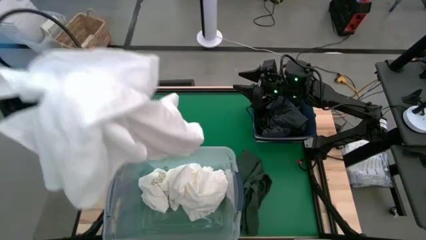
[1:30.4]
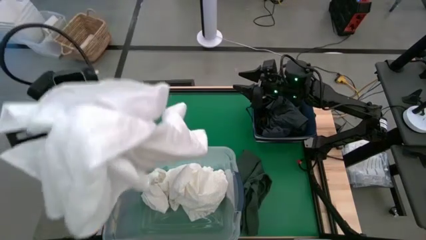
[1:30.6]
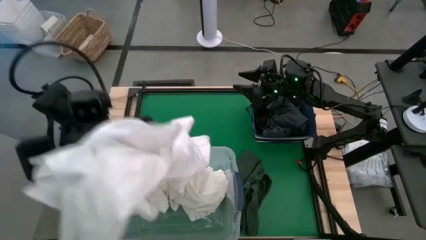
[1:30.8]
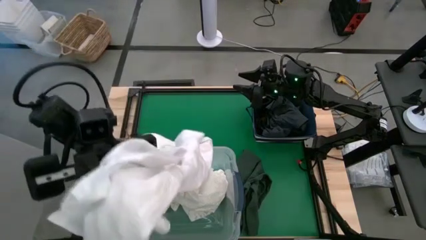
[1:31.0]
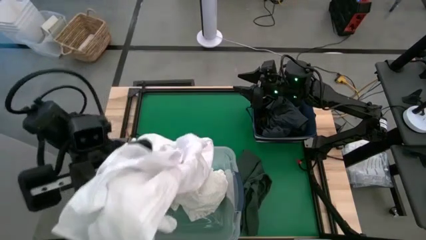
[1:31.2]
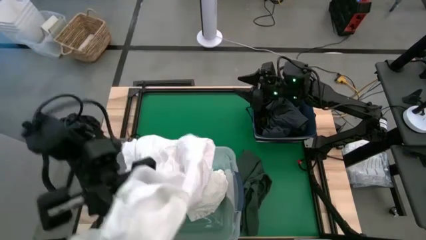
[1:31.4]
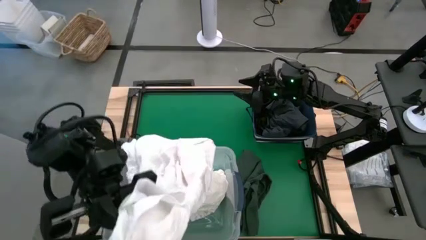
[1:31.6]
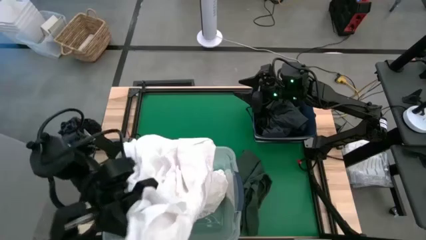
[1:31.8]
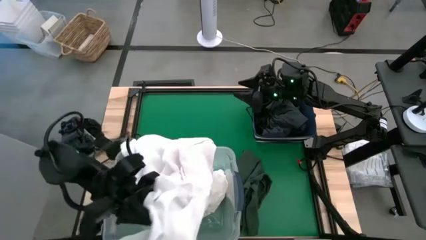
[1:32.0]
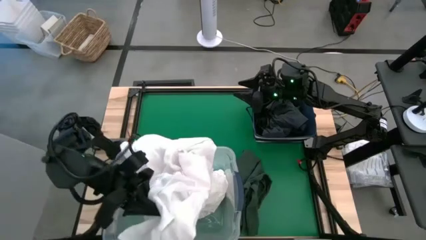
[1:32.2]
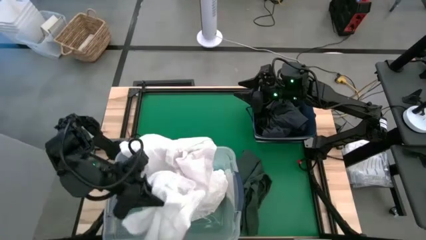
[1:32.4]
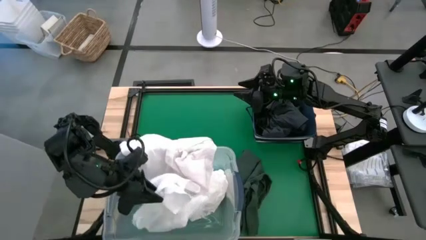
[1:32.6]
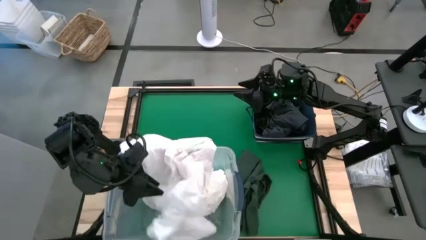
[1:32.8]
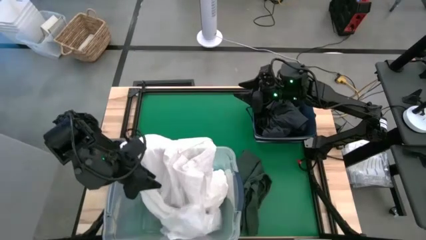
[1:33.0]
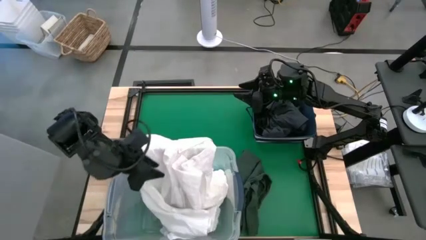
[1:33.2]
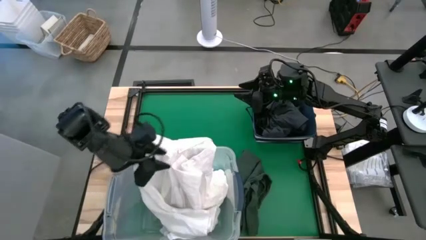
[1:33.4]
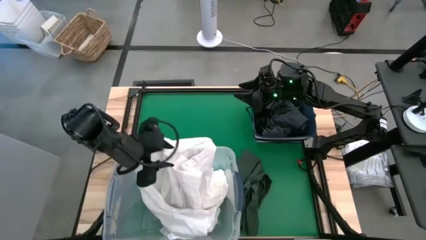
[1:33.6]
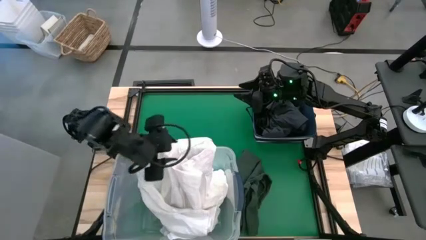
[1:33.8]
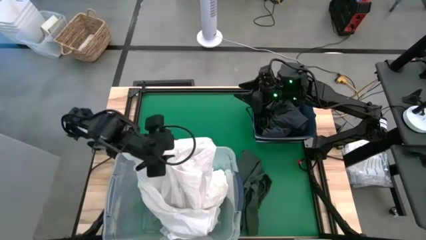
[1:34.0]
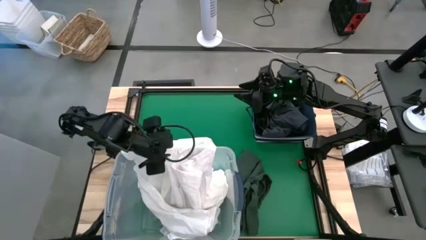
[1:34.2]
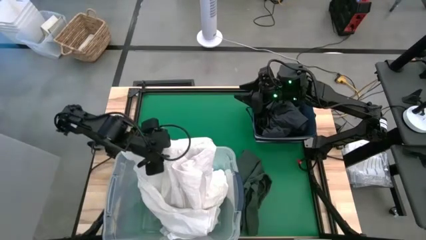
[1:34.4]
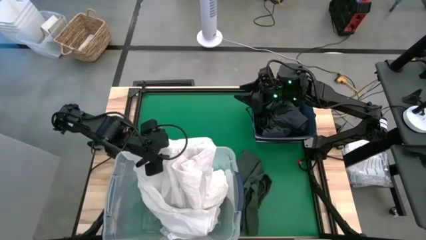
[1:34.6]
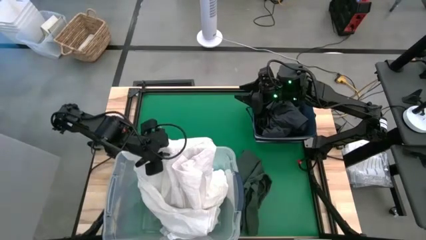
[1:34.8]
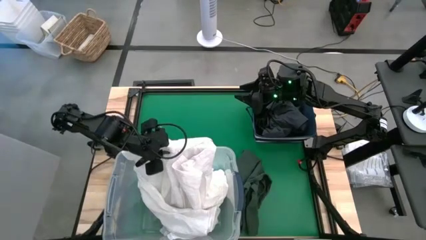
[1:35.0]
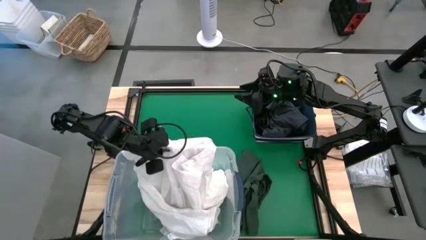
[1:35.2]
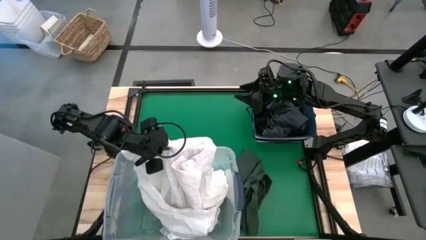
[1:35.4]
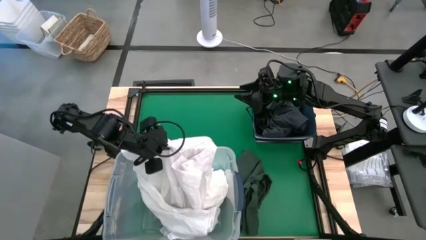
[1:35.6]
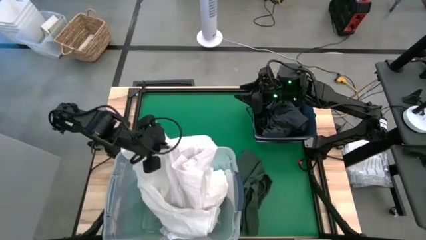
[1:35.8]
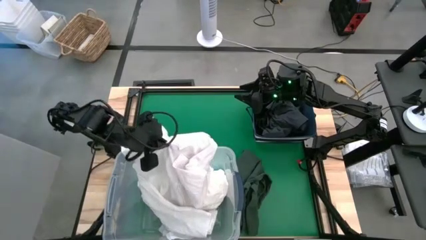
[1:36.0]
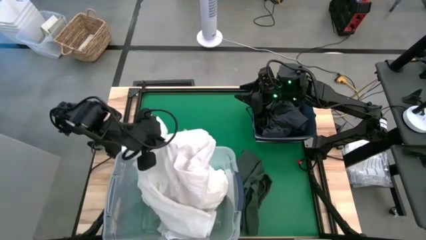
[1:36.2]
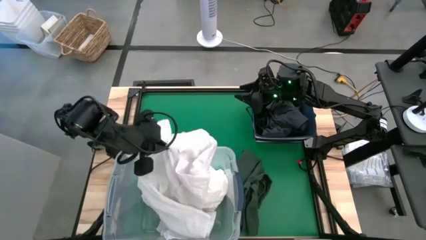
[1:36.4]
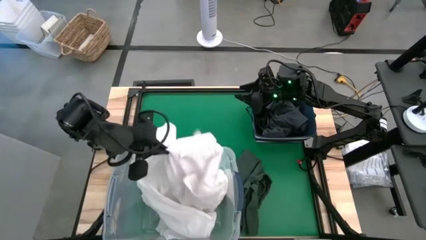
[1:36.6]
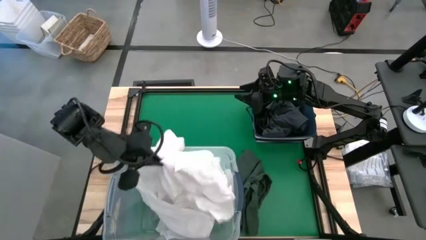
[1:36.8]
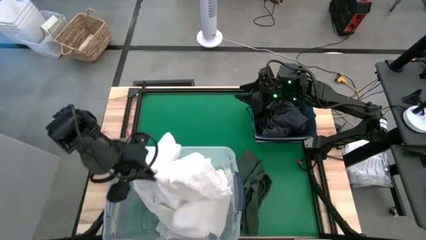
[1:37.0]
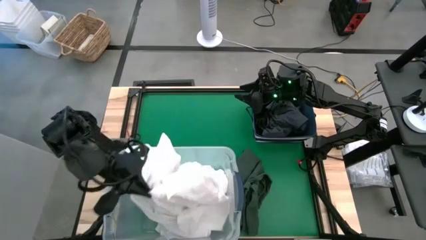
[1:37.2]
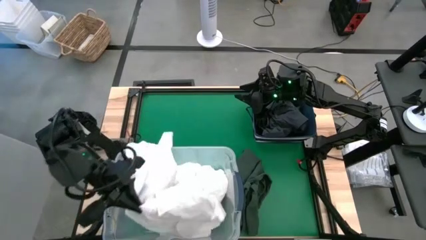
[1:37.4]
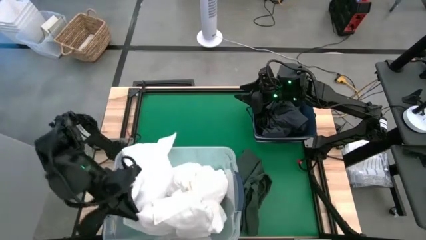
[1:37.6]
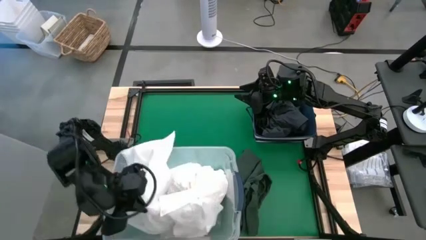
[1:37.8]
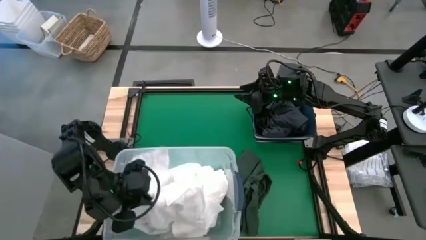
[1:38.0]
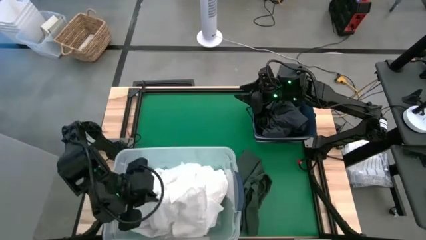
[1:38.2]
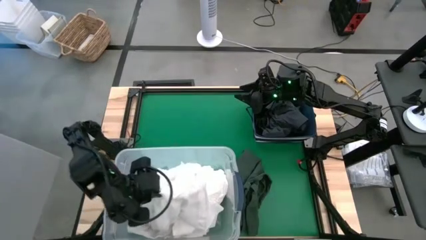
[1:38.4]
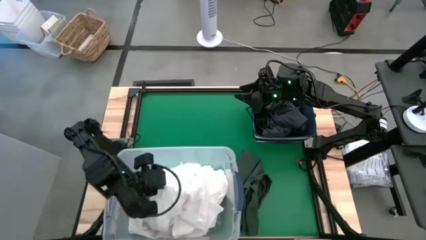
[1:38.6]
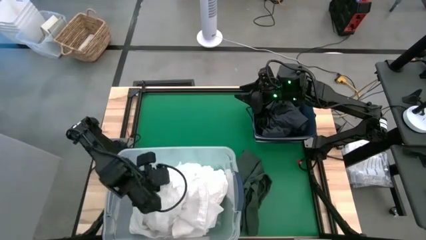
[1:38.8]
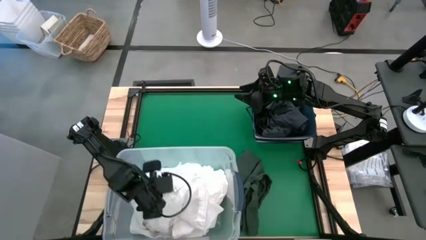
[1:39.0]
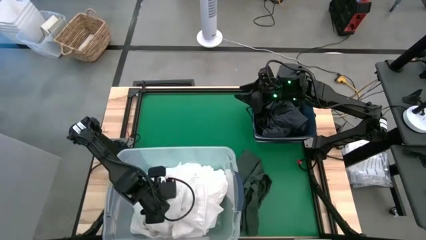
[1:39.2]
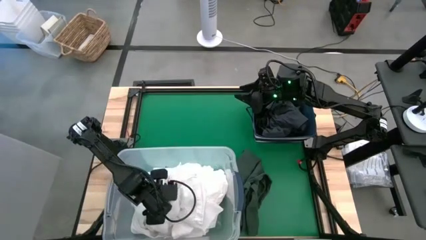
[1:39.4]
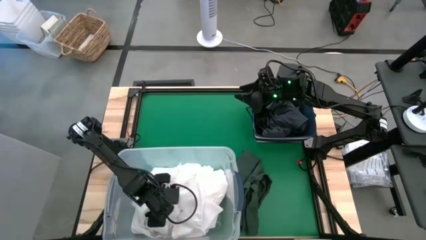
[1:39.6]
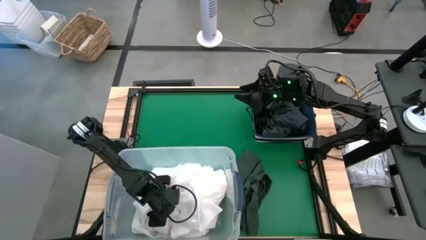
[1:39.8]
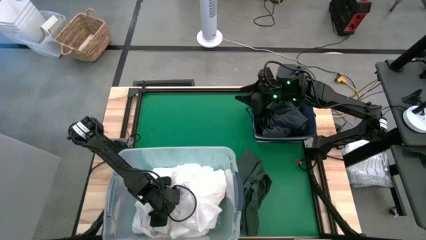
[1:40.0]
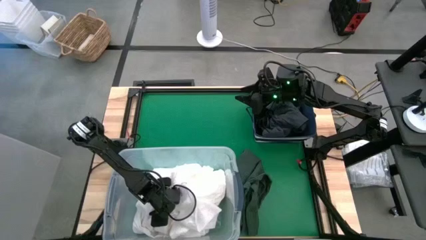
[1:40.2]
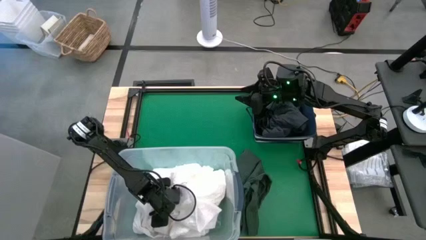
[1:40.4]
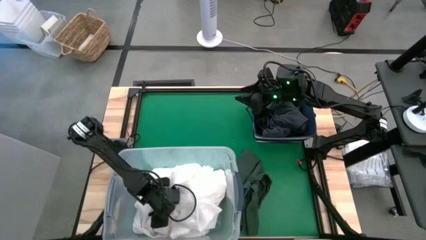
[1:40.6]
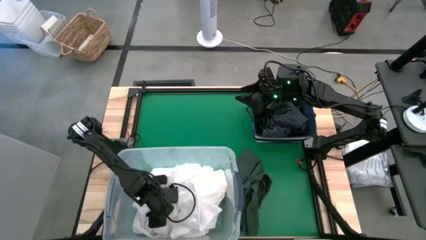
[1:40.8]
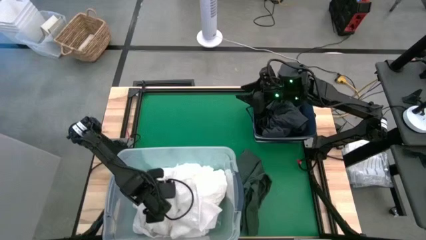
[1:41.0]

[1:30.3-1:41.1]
Put the white polo shirt into the transparent bin
